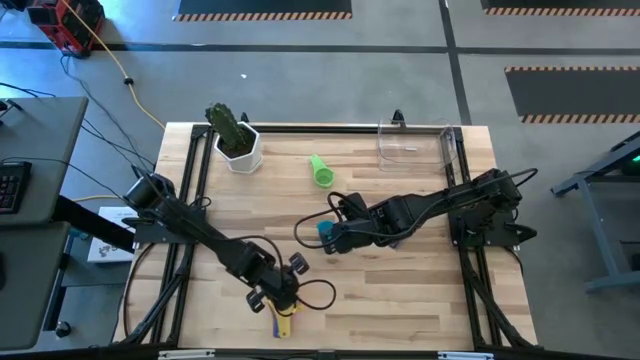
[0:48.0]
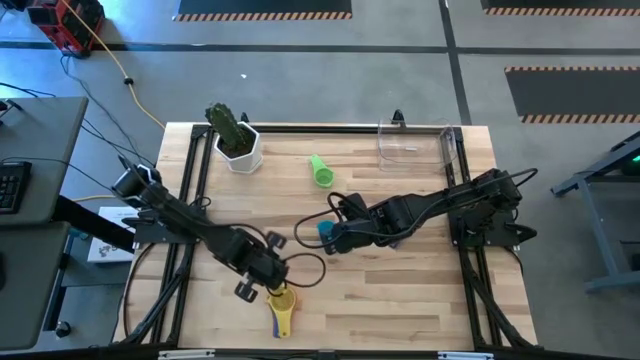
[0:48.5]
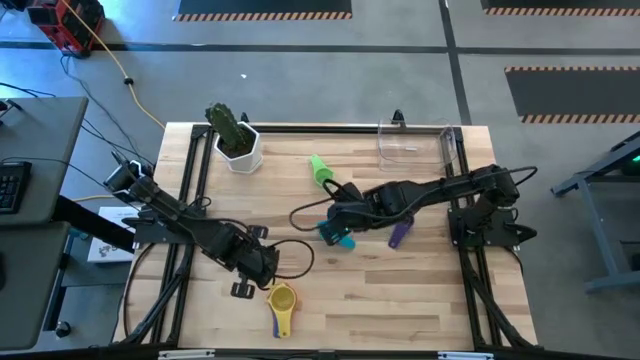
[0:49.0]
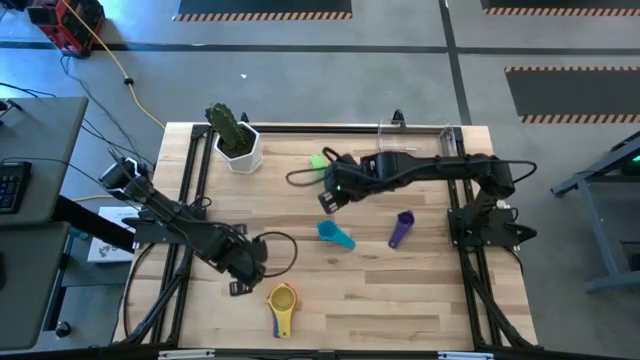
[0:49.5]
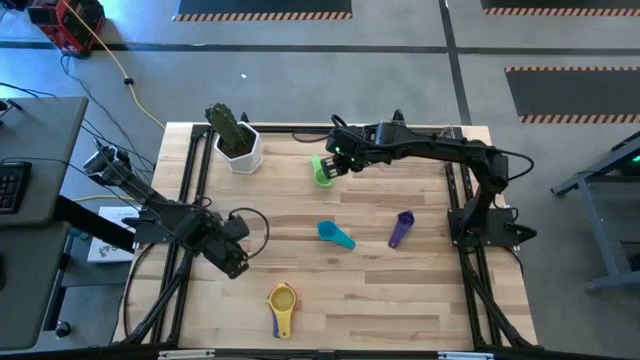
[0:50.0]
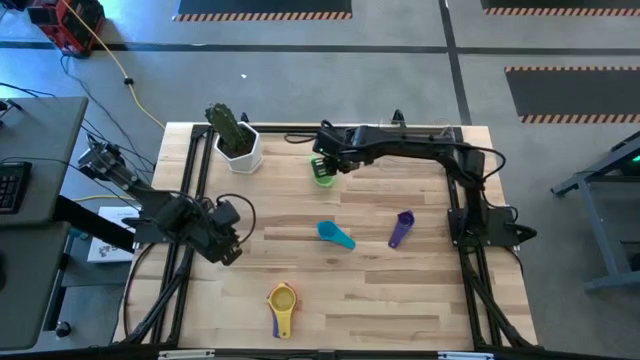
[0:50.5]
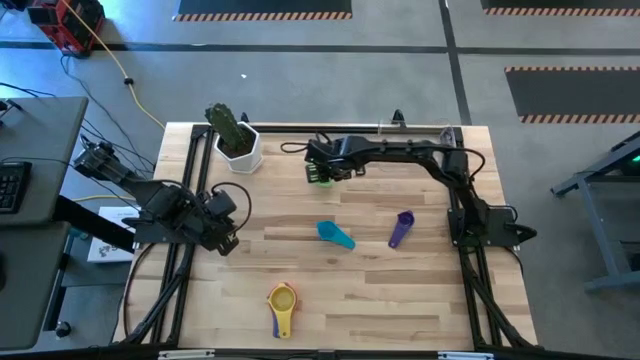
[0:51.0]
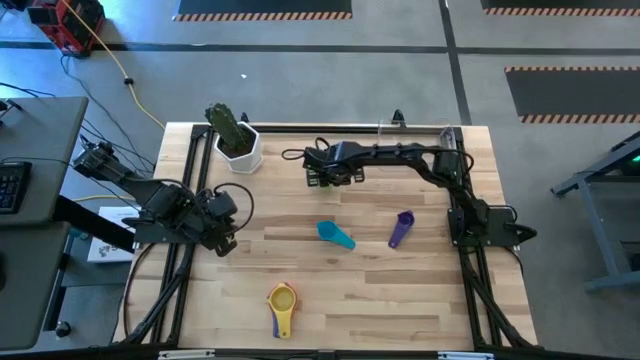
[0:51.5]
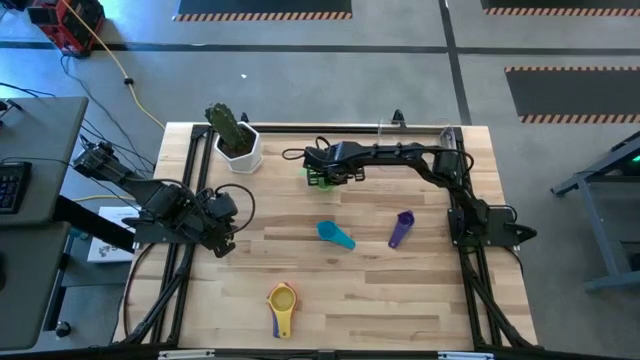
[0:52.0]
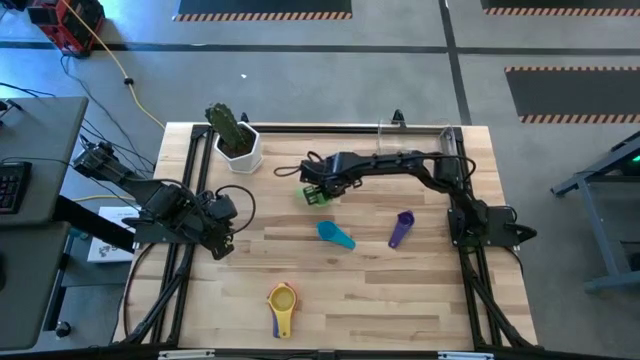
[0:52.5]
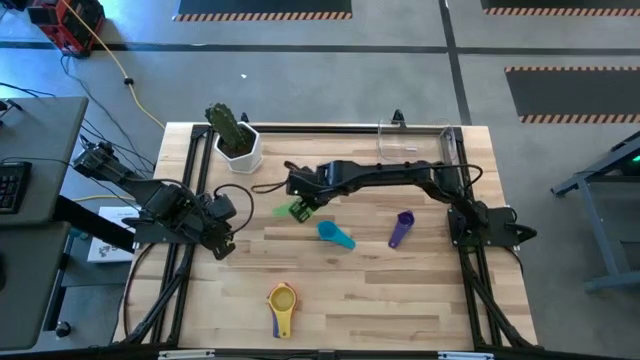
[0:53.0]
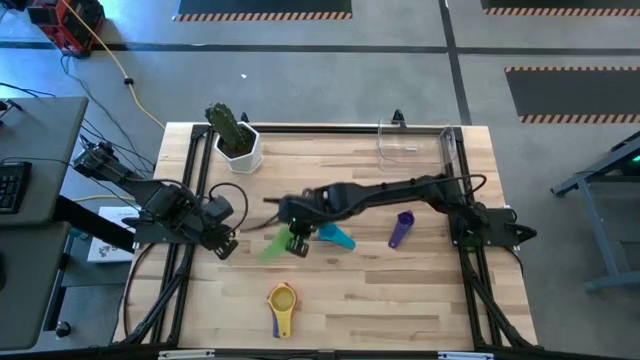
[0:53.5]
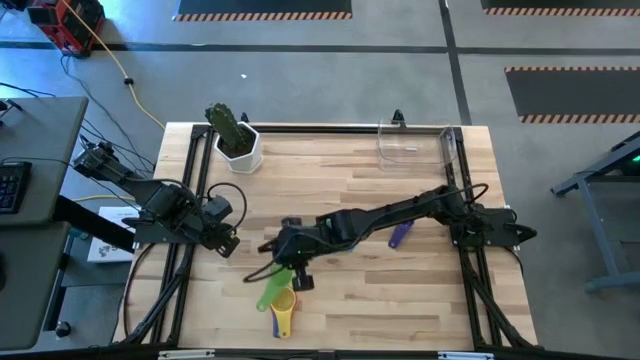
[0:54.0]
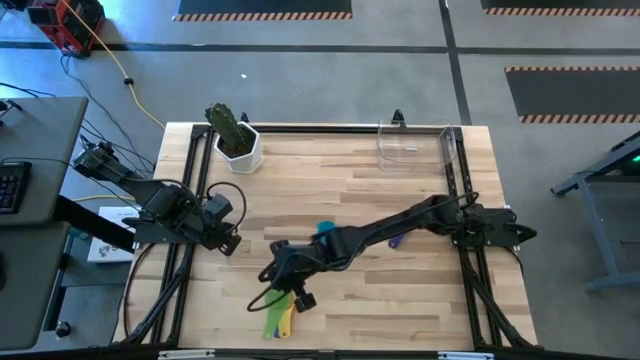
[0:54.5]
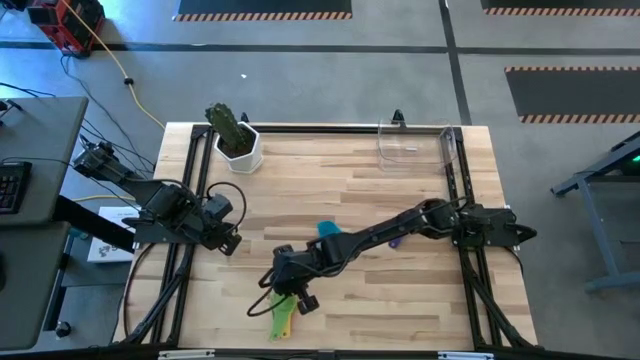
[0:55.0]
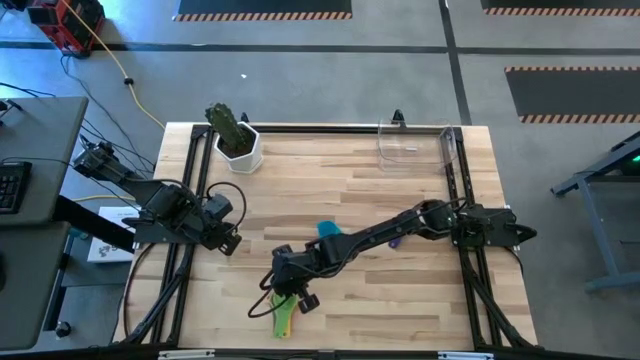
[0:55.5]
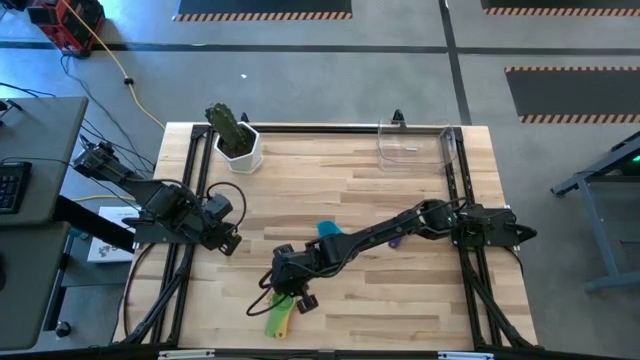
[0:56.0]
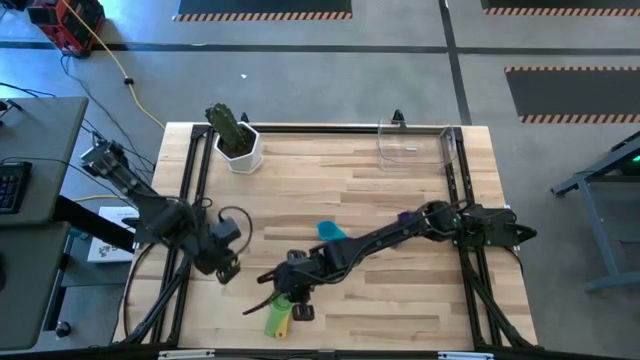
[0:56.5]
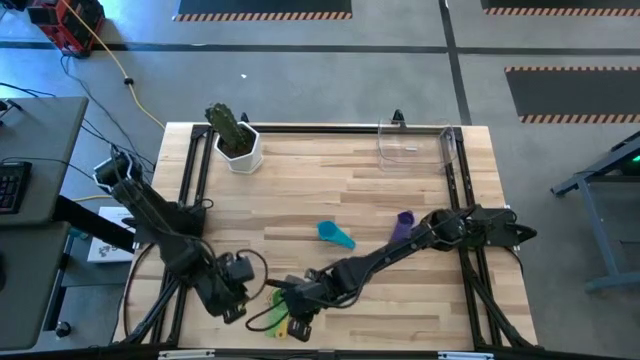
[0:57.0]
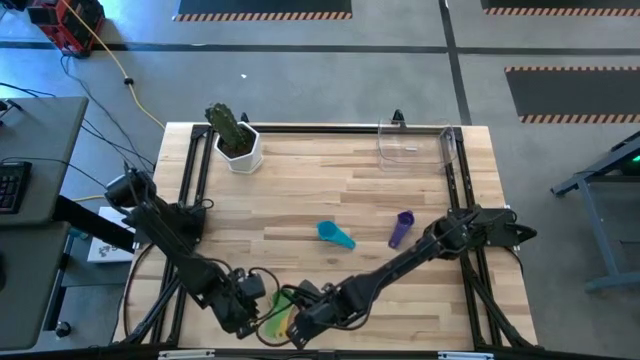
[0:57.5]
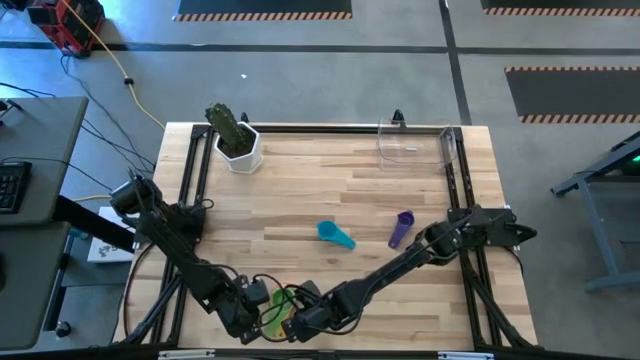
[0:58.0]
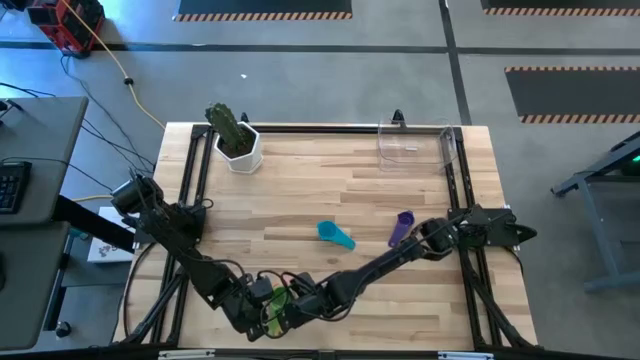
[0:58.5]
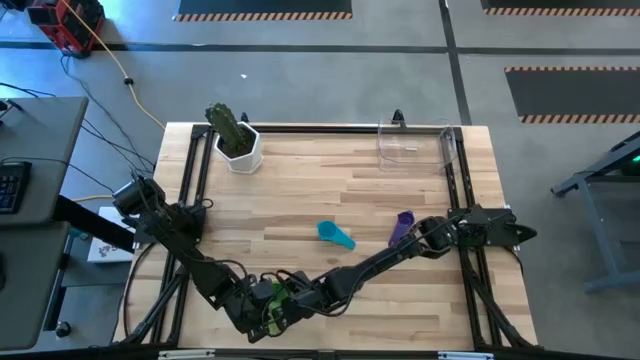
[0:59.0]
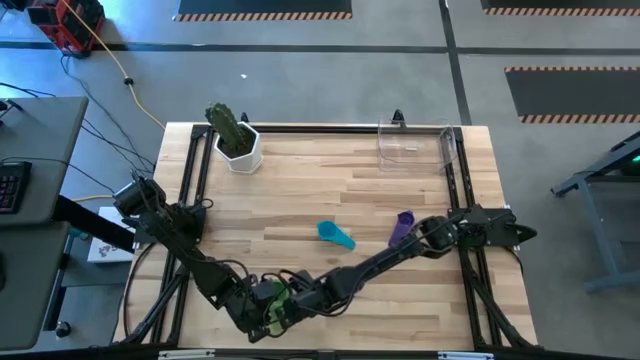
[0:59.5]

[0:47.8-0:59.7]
Task: Nest measuring cups in basket
Stack the green measuring cup on the yellow measuring cup

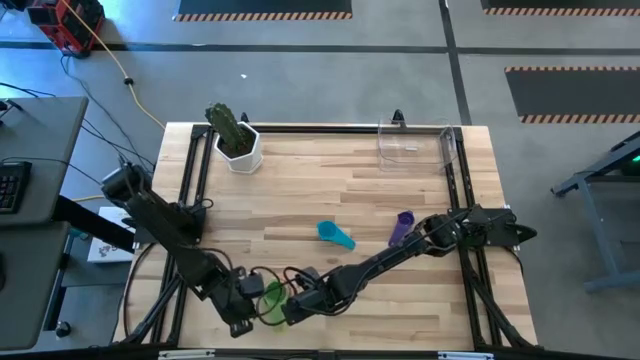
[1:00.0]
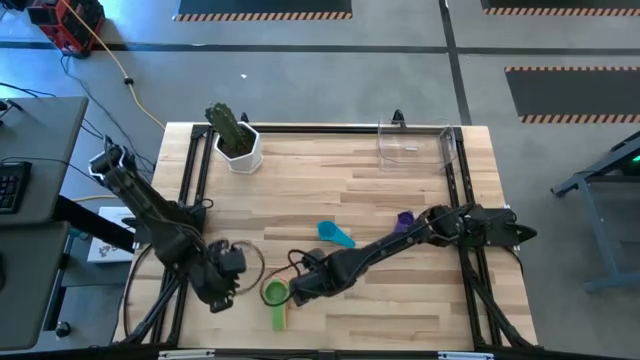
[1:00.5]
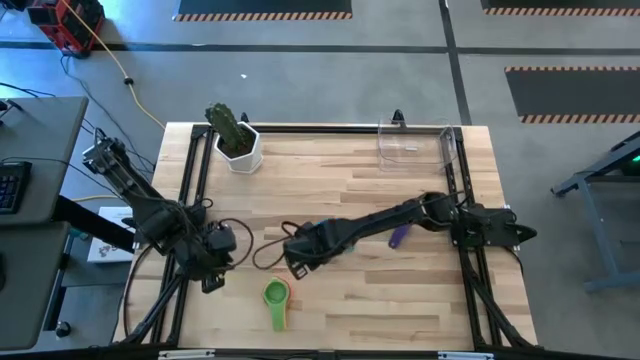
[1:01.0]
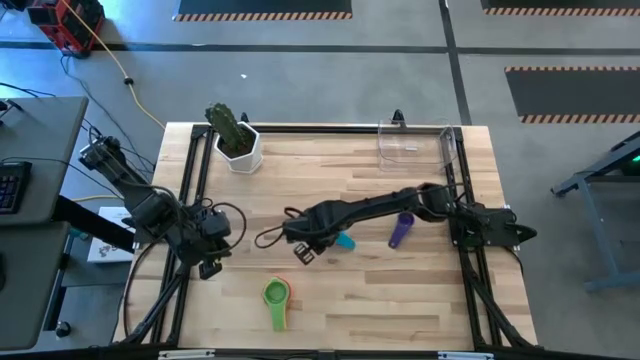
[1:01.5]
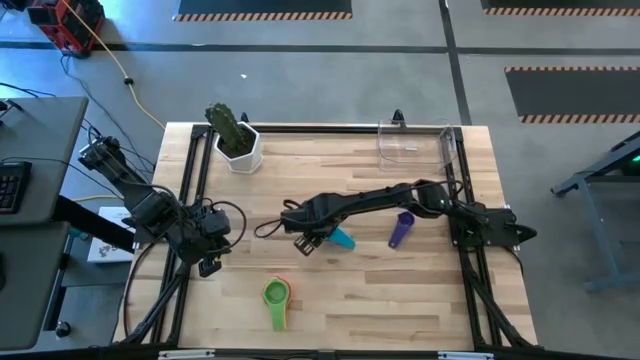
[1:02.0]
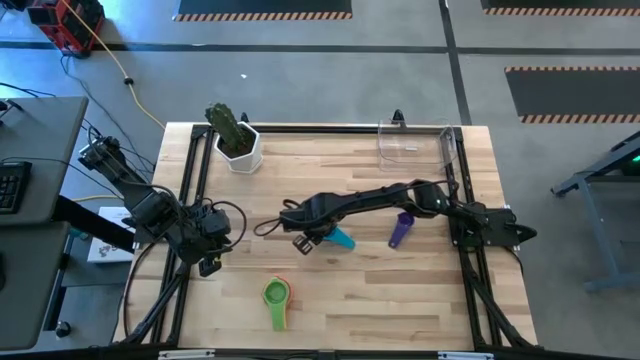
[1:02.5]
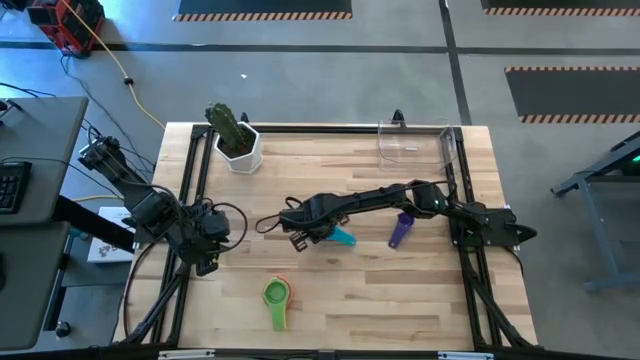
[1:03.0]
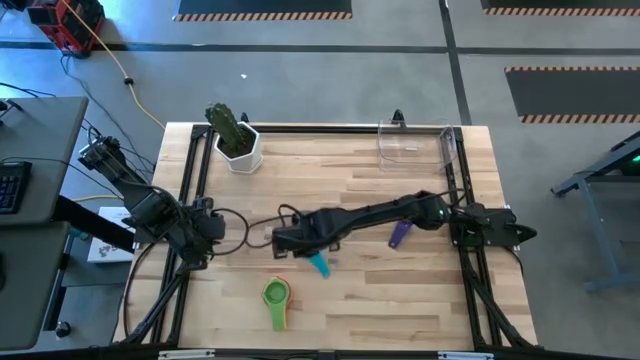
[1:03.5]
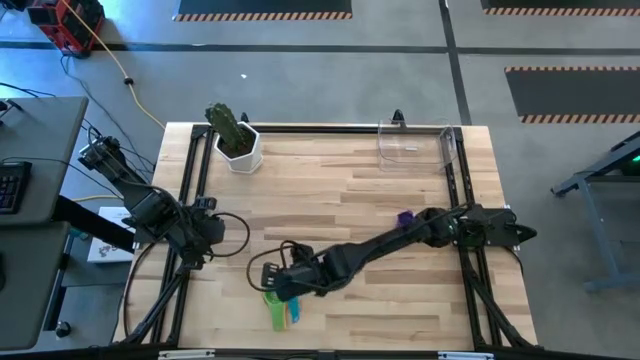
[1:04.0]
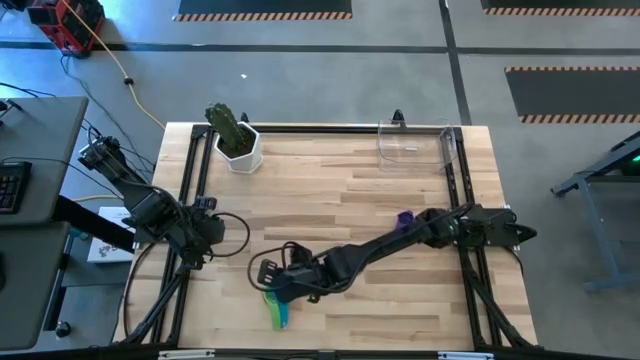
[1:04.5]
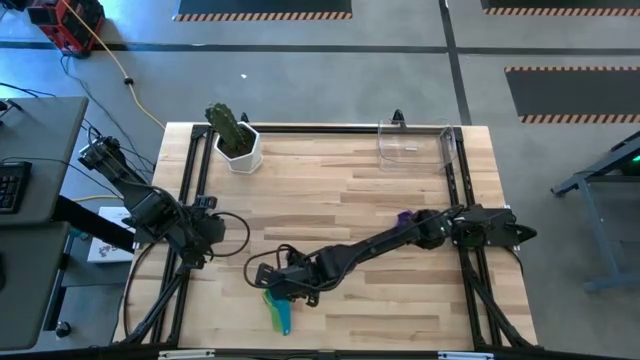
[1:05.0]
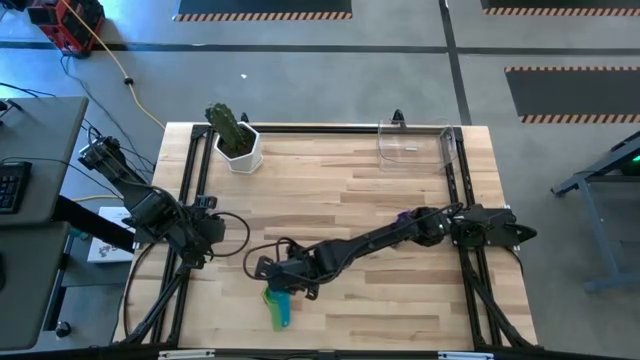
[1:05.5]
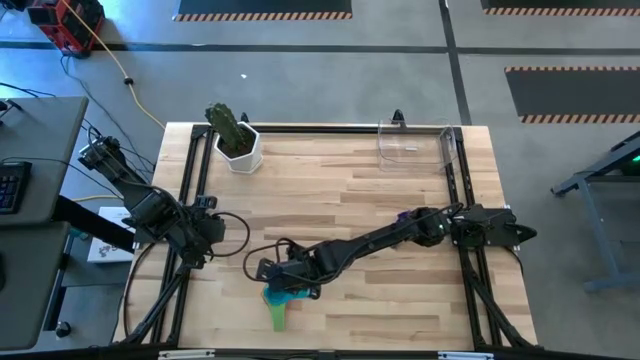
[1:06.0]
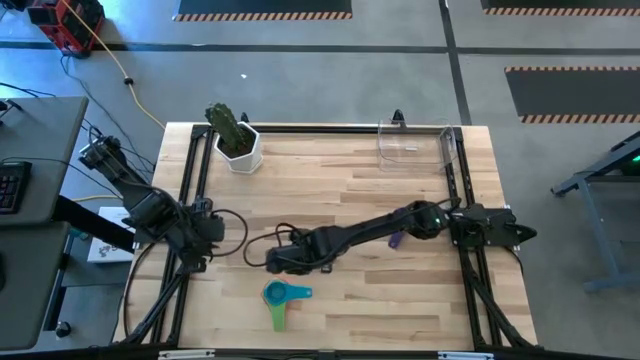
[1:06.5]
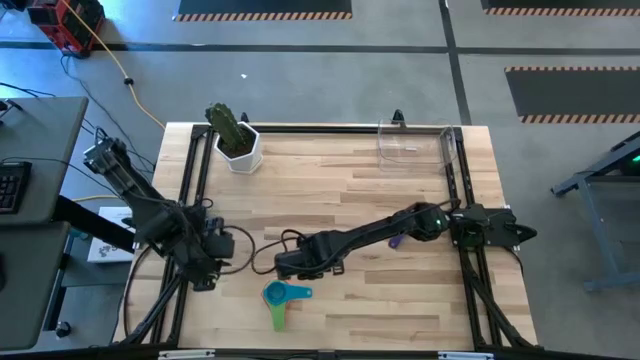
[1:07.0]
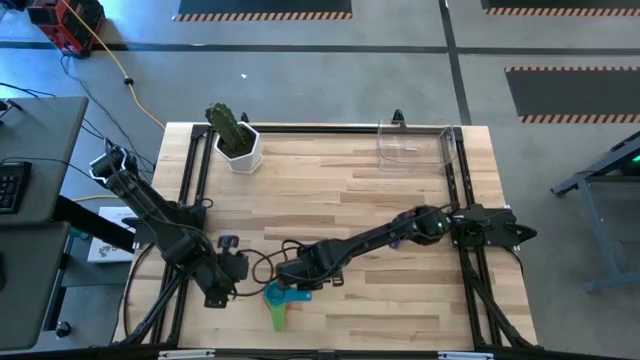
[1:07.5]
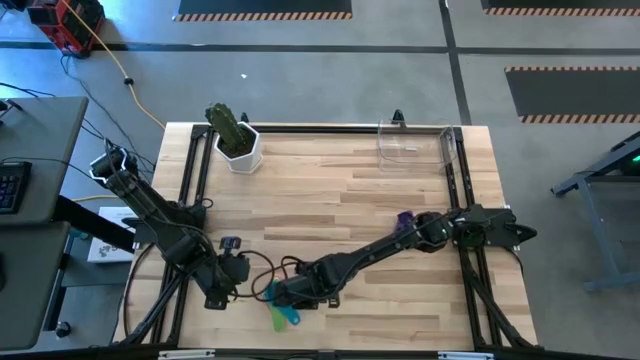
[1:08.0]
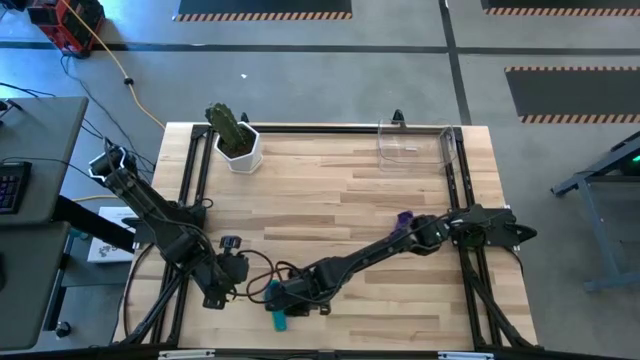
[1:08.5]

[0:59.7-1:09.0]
Stack the light blue measuring cup on the green measuring cup

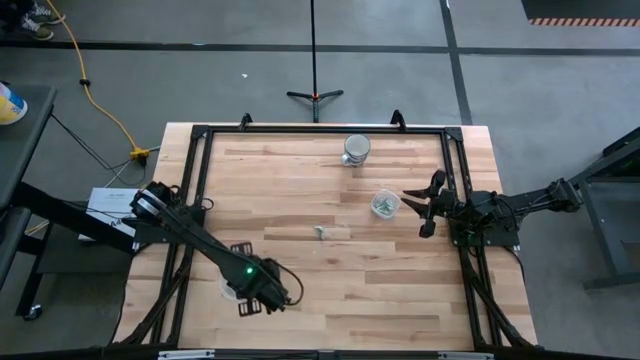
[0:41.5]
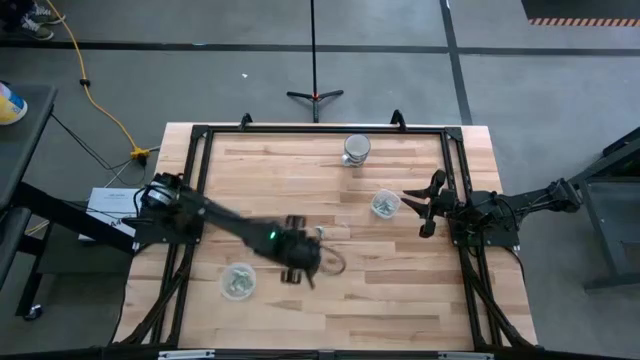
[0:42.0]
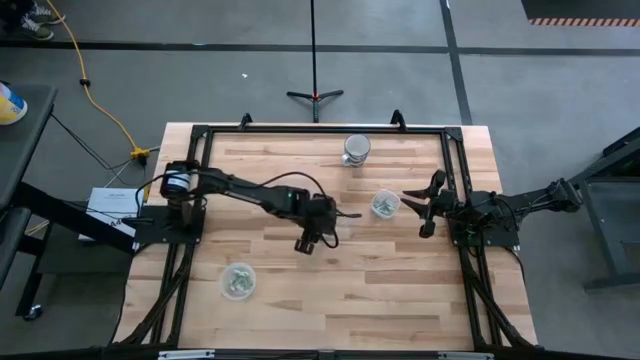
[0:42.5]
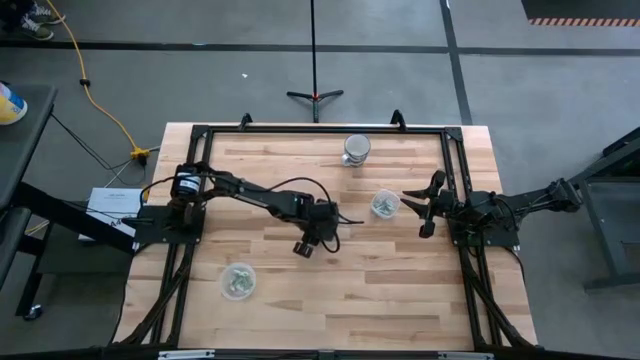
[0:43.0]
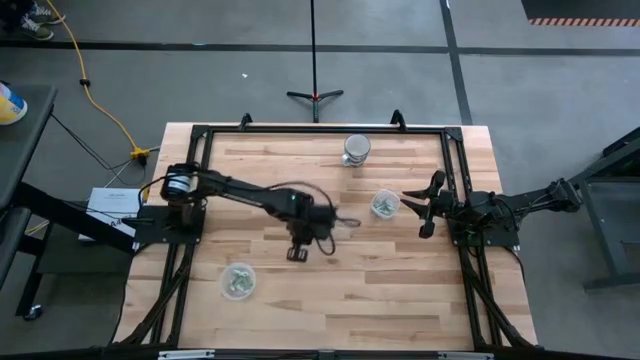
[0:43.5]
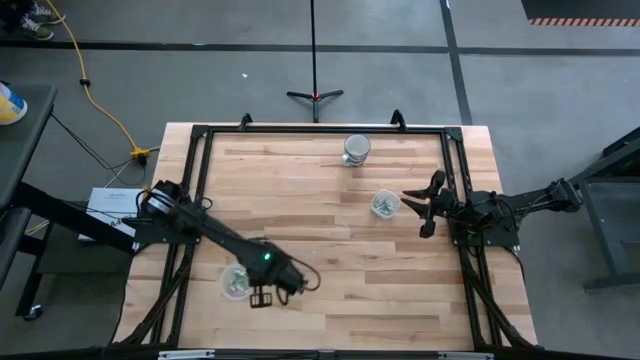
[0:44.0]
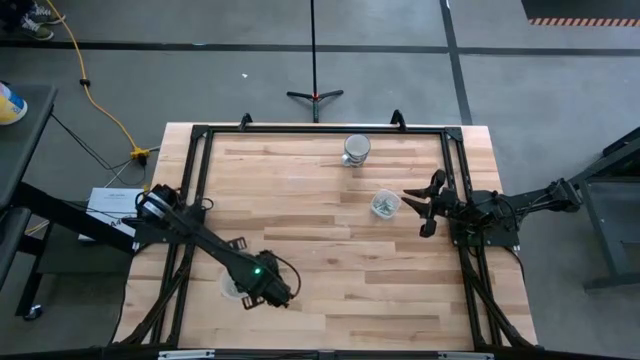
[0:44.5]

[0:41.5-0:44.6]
Task: Pick and place Stevia / Truvia into bins
Put the stevia packet into the round transparent container
